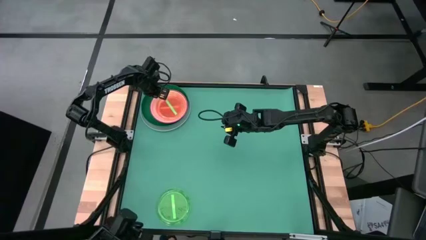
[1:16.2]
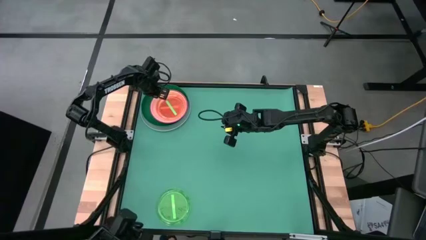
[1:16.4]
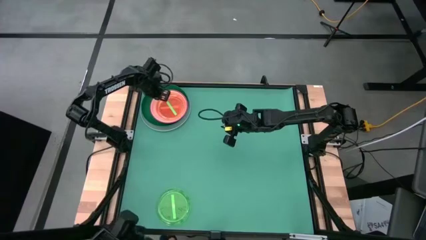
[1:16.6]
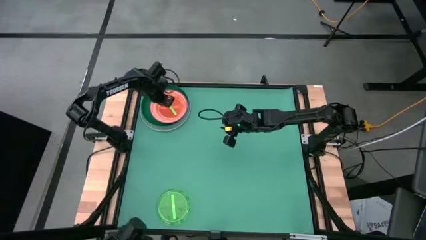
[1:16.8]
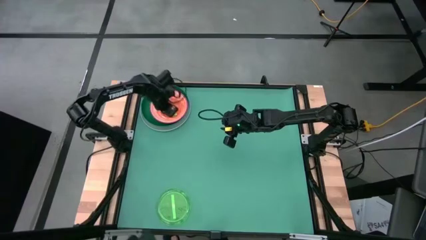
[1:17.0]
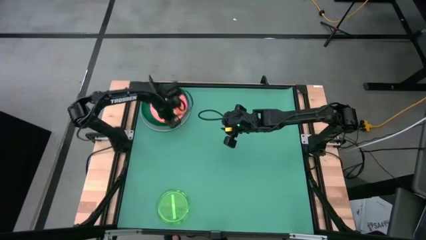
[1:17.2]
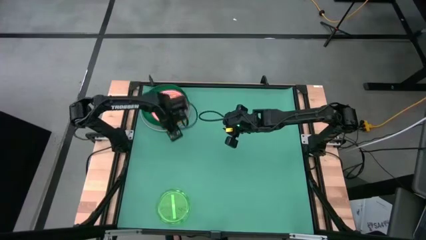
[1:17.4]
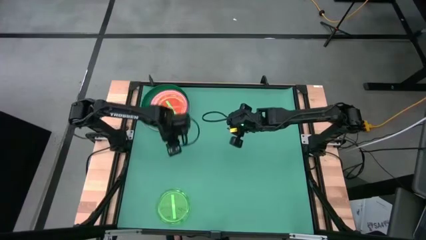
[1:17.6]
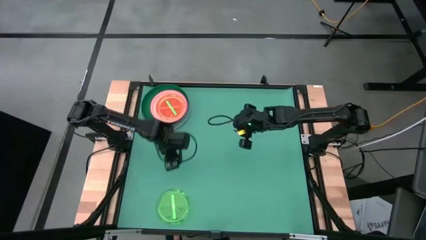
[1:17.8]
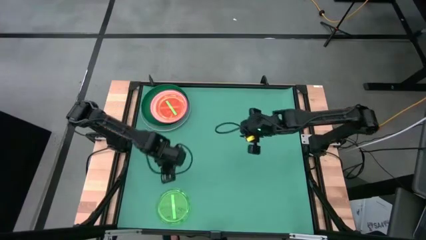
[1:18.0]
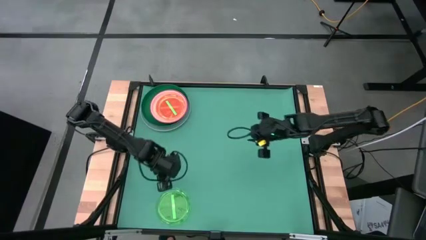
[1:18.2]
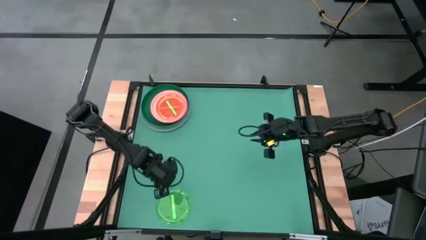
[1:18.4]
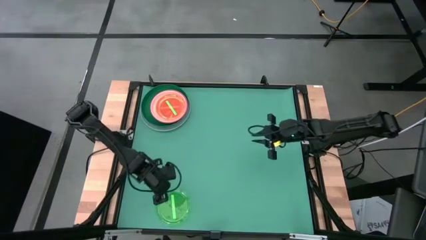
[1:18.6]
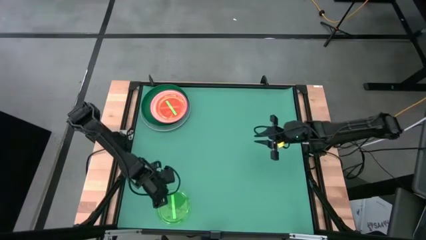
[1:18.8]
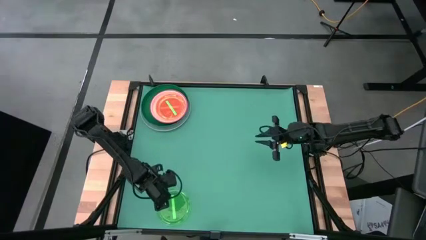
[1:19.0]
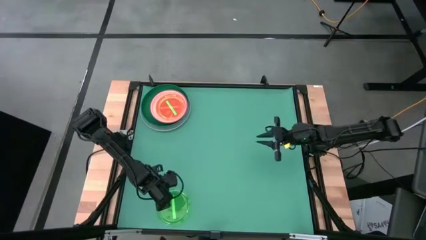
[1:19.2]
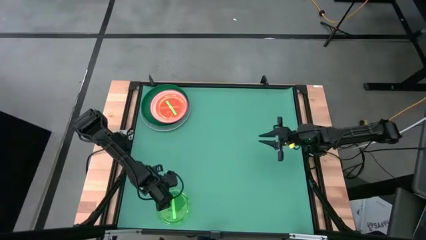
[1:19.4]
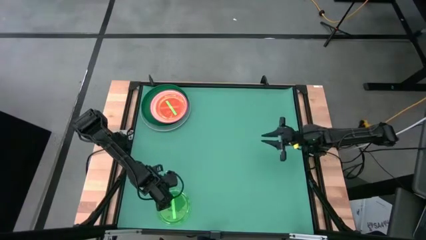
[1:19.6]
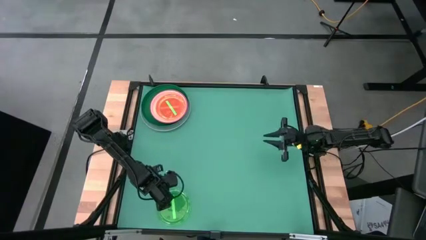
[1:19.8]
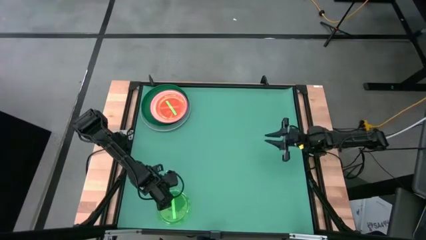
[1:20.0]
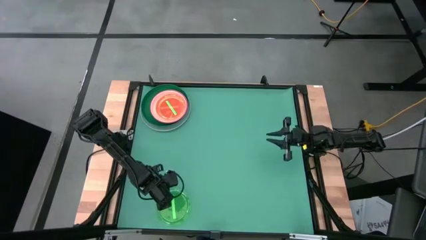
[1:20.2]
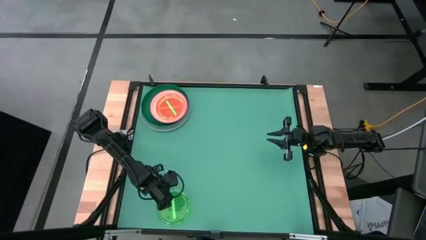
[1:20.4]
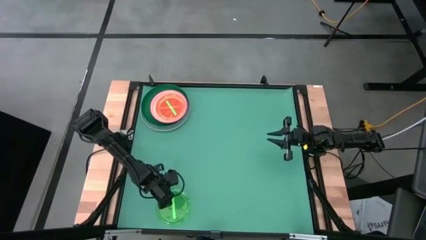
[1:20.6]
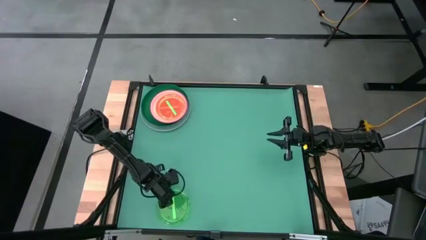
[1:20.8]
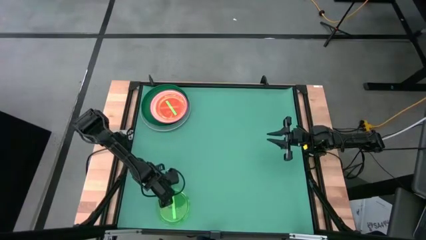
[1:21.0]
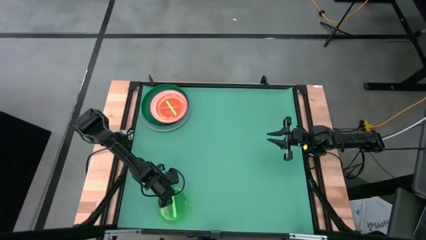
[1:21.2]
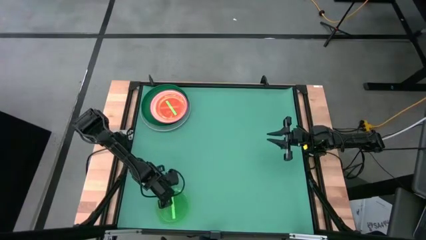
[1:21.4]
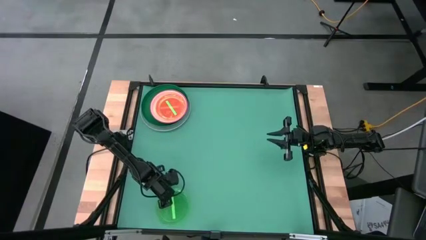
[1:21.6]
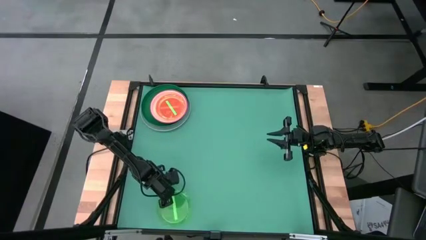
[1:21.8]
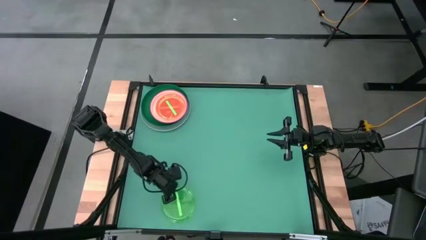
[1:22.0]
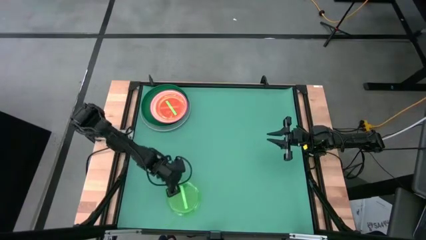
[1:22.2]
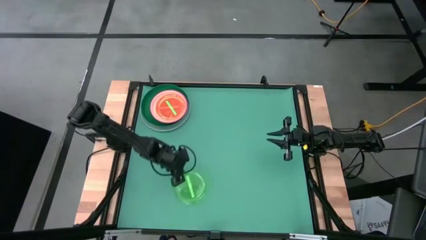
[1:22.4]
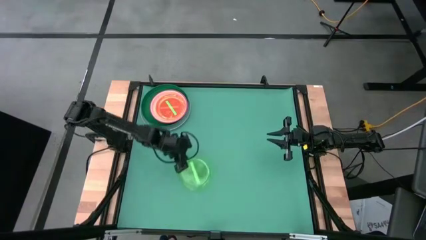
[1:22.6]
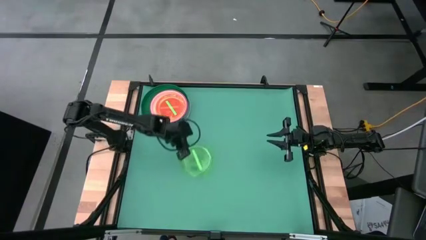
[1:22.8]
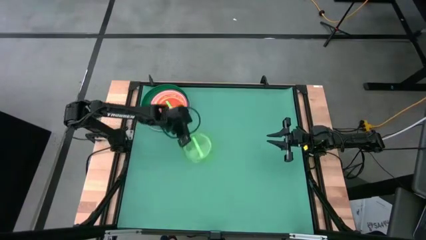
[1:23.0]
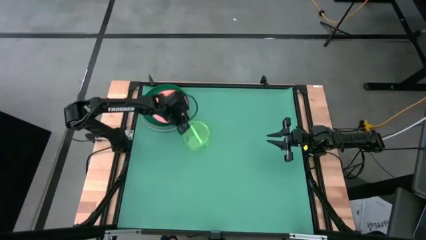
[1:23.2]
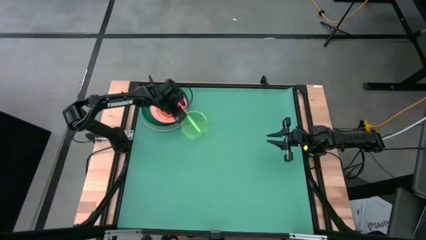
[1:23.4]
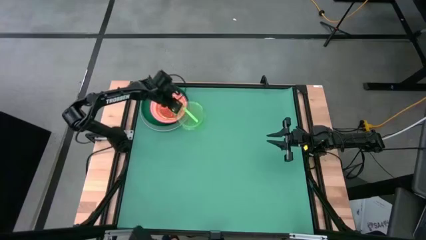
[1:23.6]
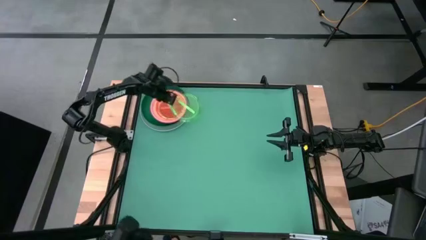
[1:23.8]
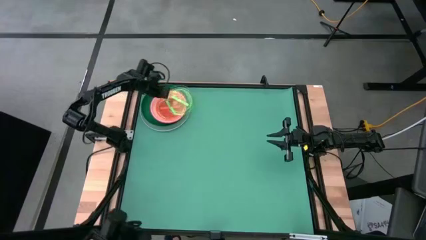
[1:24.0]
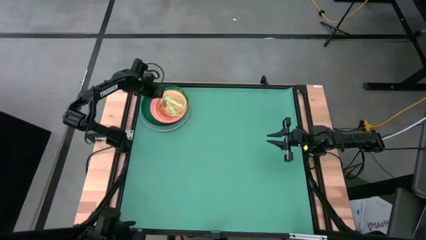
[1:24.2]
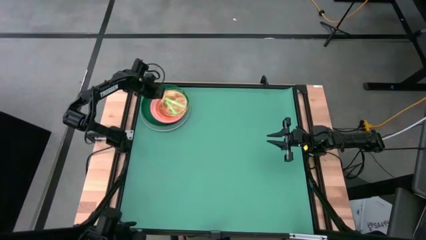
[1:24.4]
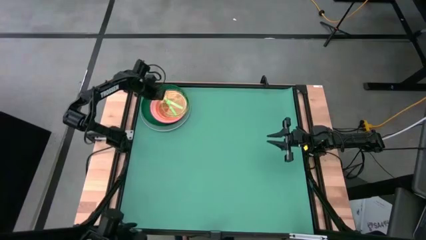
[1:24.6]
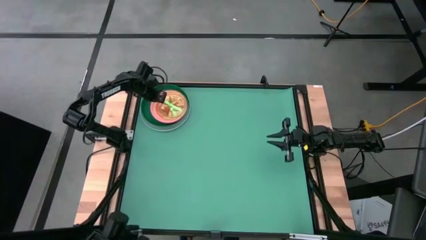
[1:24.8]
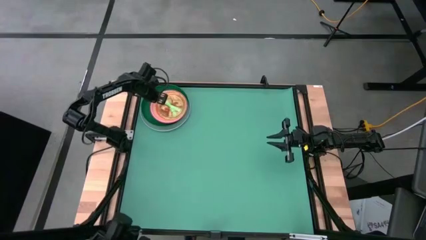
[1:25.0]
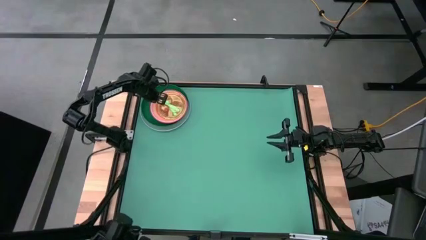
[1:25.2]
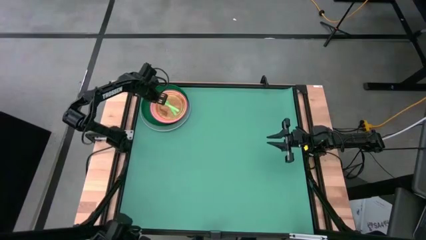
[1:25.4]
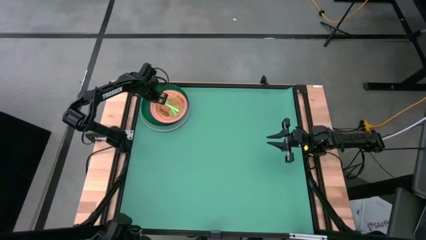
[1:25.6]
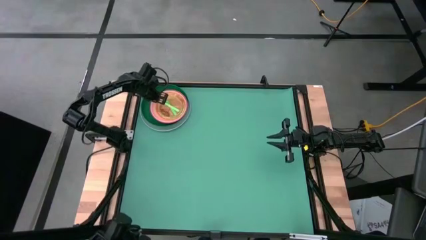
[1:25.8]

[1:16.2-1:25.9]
Task: Stack plastic plates
Stack the green plate on top of the green plate

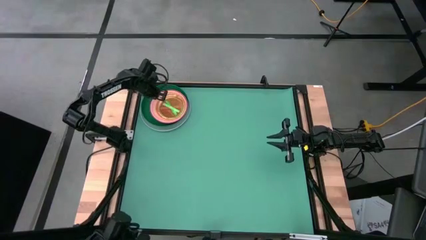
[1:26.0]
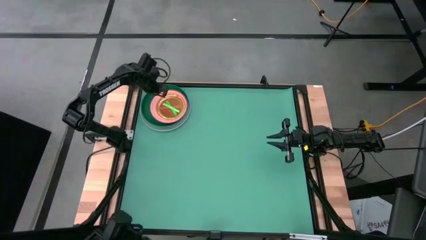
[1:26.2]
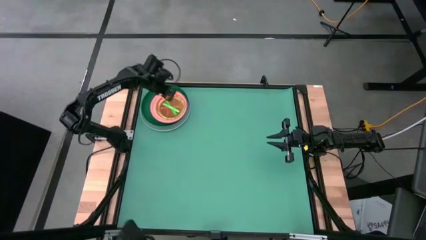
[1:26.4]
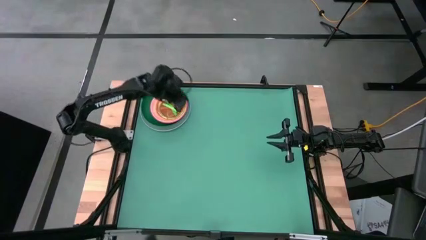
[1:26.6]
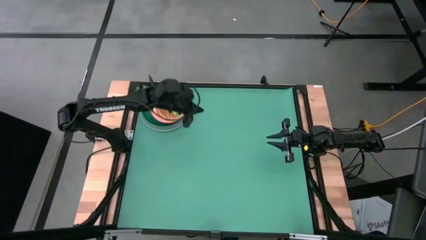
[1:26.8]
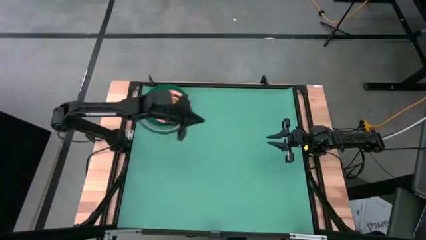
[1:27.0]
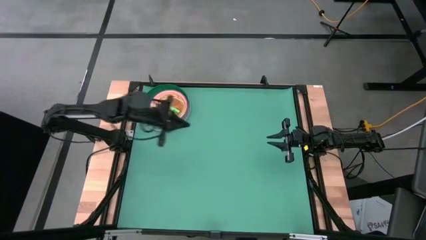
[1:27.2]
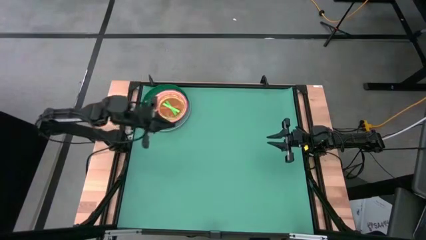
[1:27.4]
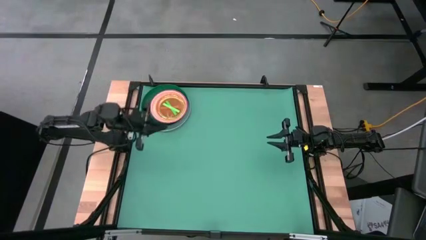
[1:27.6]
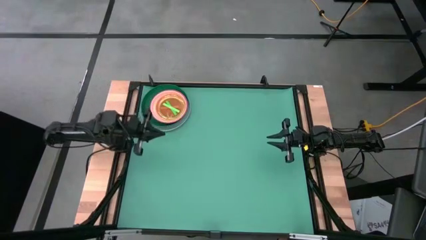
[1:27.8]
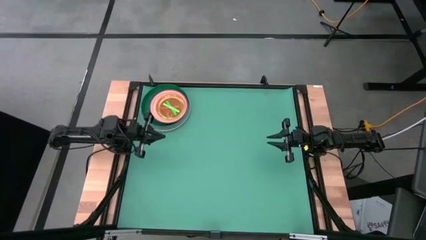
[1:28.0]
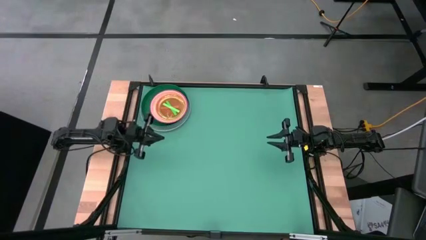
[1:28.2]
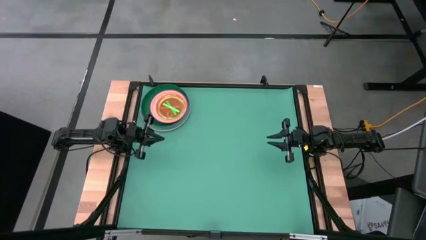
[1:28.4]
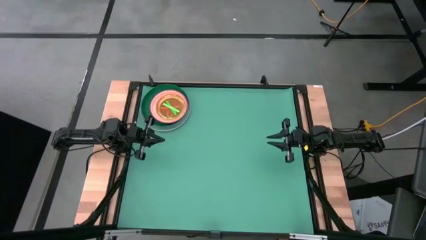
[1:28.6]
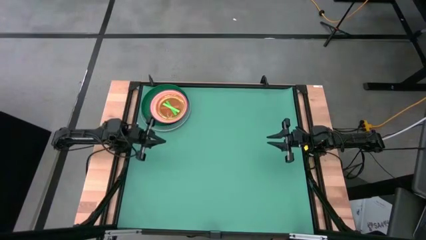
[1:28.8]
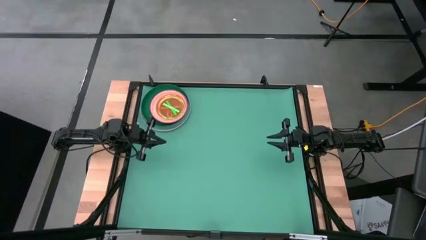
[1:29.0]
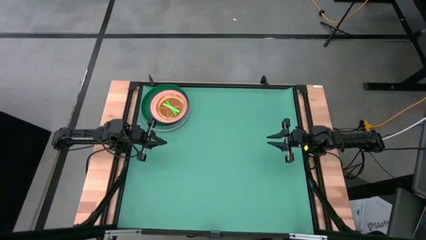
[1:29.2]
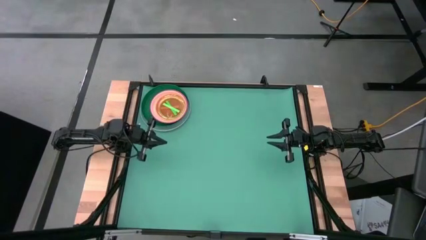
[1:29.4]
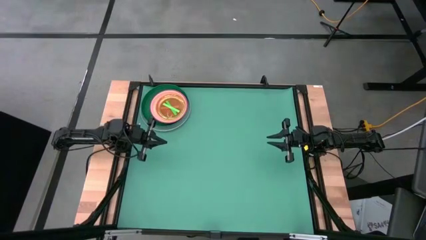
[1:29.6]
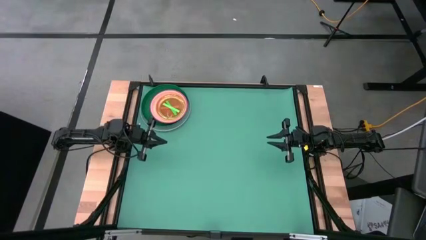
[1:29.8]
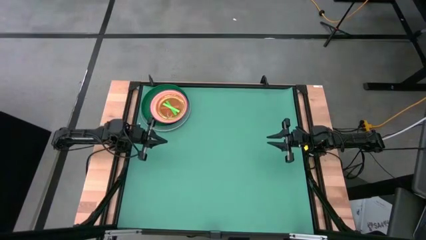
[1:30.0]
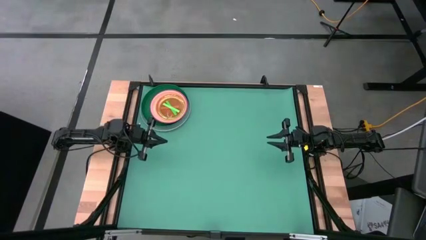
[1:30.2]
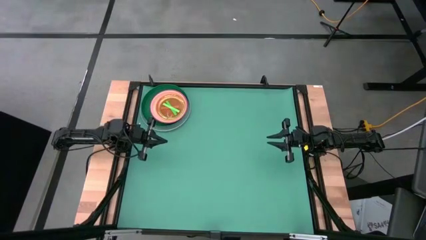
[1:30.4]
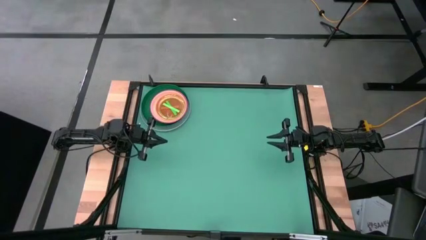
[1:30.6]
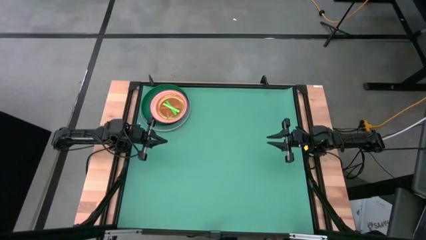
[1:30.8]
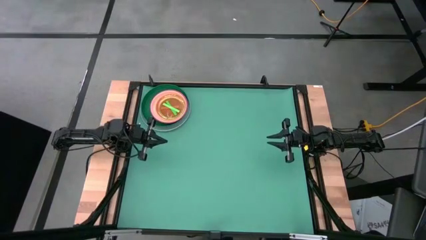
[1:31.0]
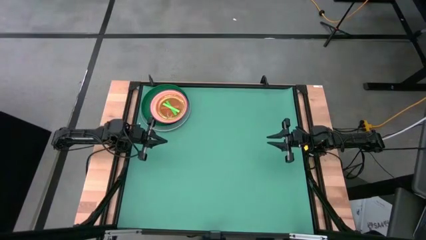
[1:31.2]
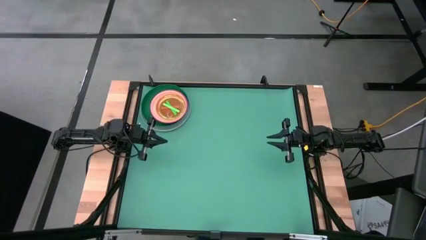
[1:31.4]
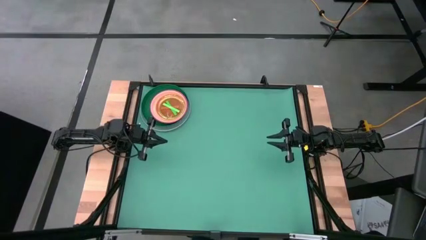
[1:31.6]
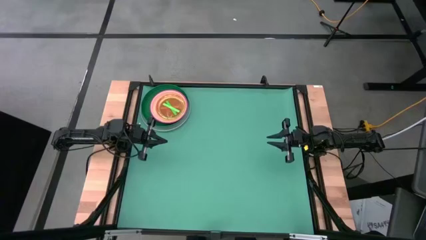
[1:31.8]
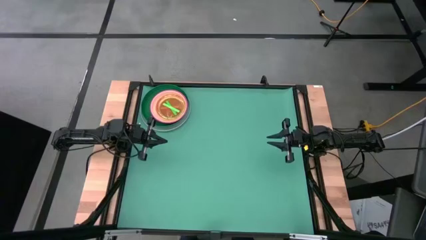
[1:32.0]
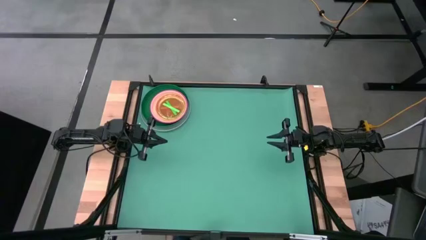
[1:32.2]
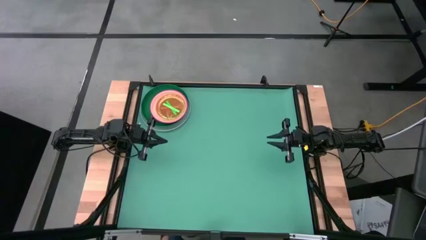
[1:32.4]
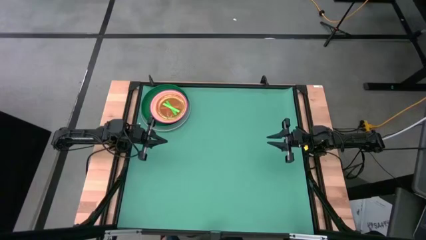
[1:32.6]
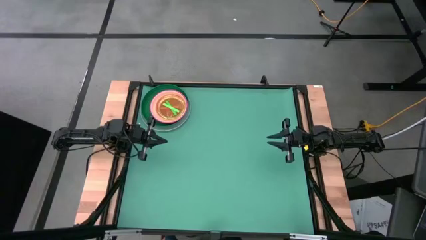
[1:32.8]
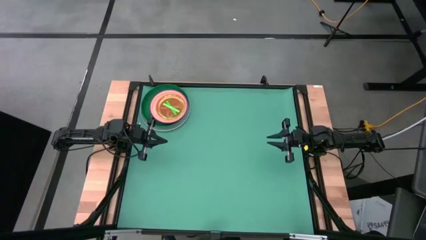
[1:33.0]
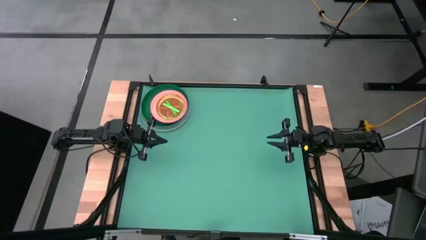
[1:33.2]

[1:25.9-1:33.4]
Return to Home Position
